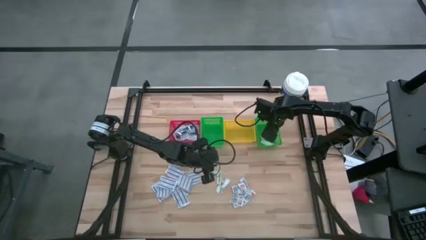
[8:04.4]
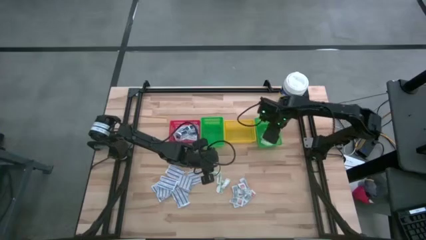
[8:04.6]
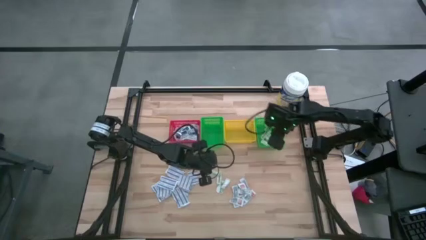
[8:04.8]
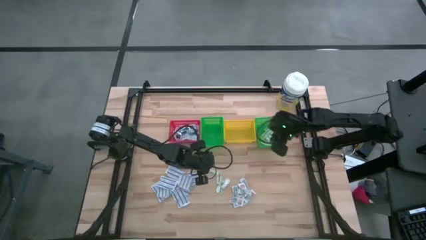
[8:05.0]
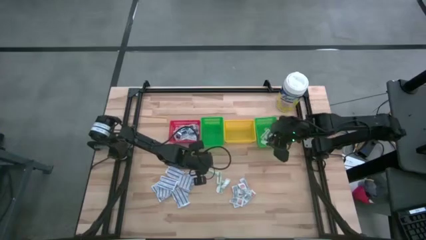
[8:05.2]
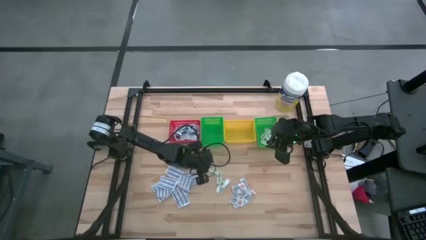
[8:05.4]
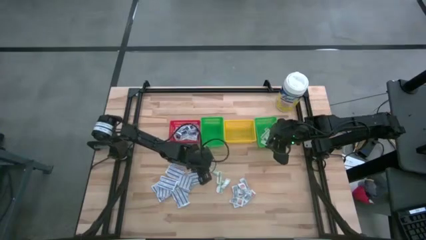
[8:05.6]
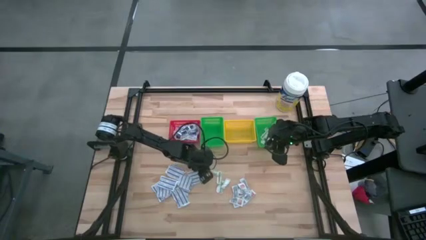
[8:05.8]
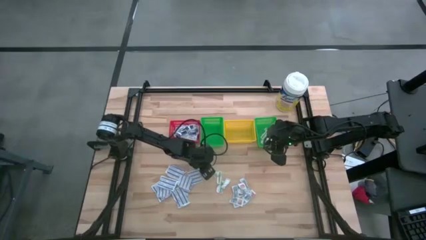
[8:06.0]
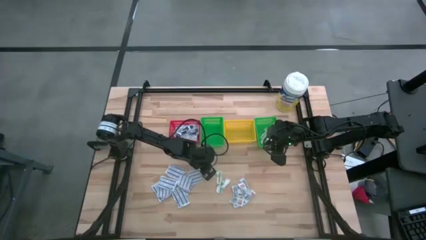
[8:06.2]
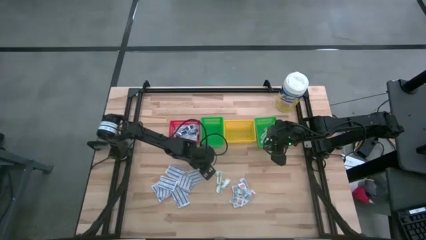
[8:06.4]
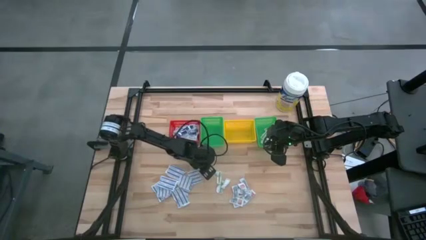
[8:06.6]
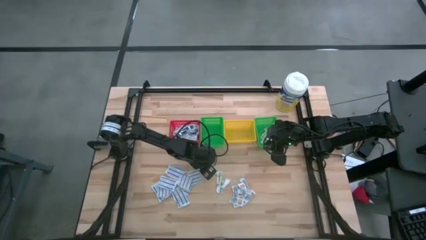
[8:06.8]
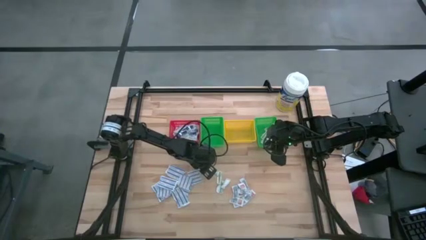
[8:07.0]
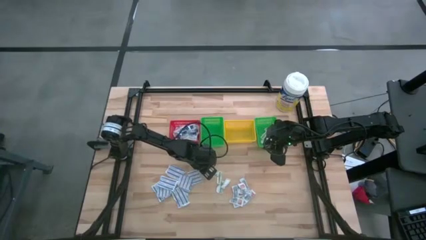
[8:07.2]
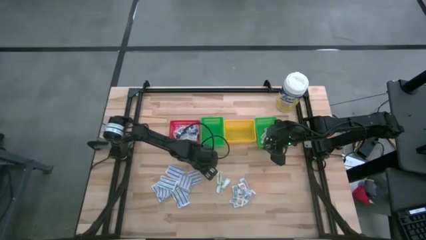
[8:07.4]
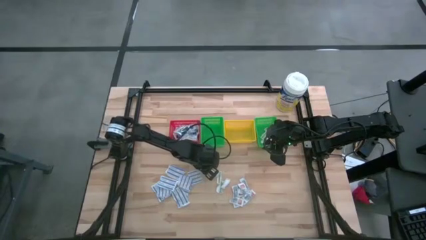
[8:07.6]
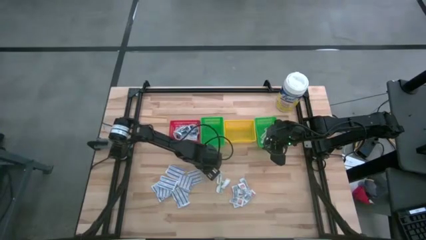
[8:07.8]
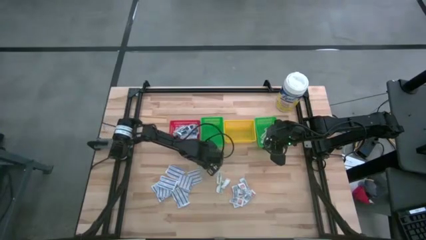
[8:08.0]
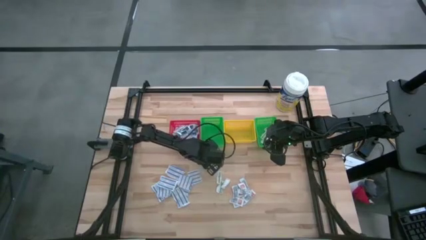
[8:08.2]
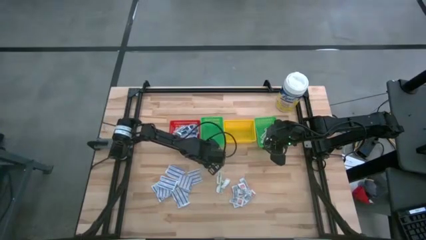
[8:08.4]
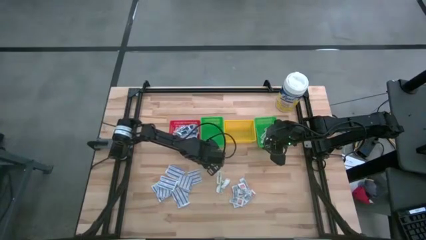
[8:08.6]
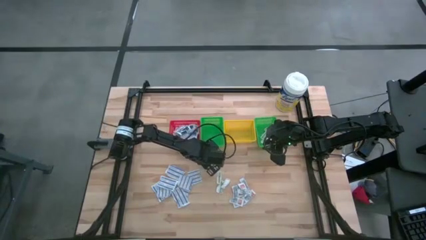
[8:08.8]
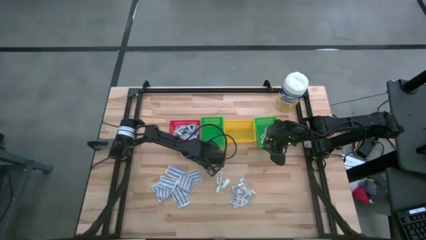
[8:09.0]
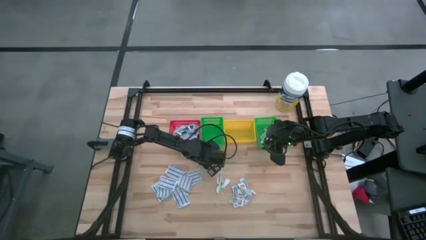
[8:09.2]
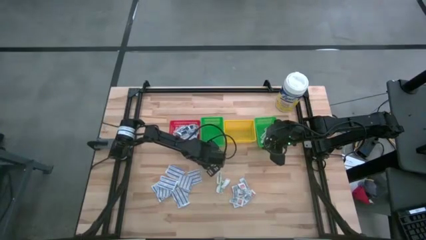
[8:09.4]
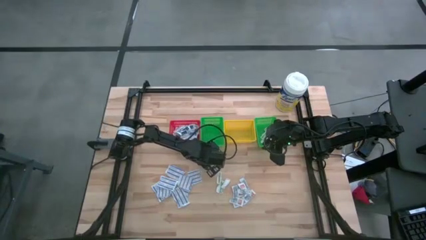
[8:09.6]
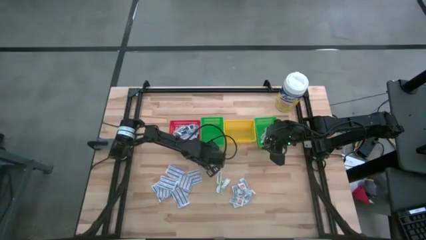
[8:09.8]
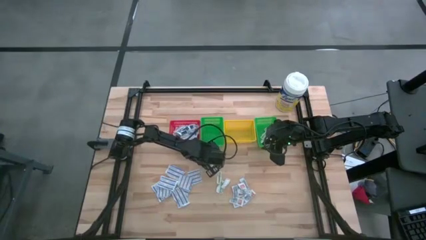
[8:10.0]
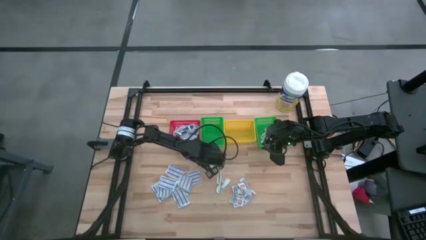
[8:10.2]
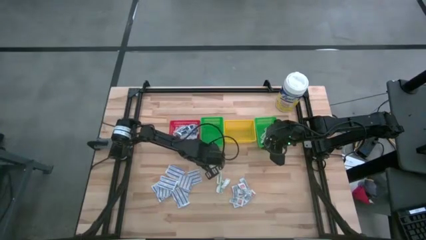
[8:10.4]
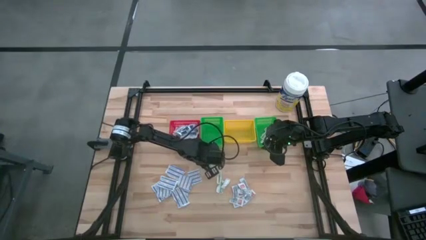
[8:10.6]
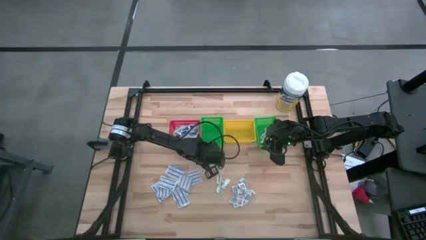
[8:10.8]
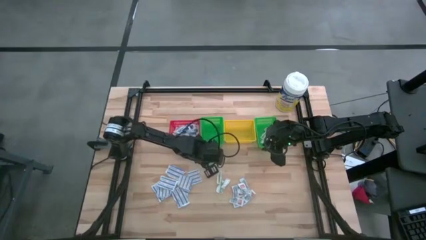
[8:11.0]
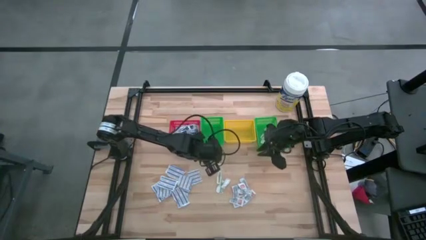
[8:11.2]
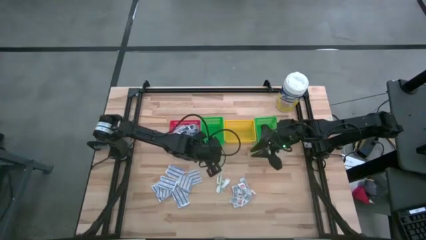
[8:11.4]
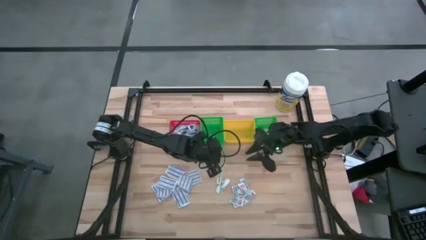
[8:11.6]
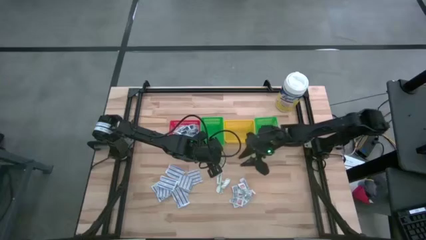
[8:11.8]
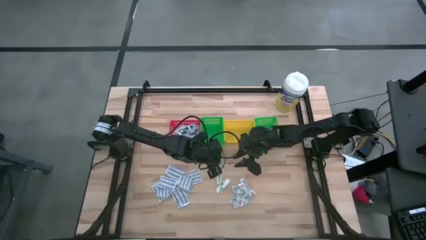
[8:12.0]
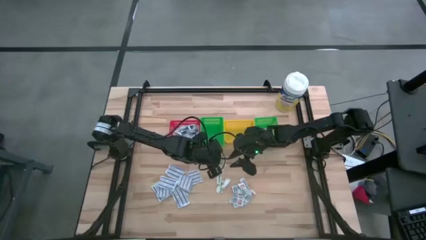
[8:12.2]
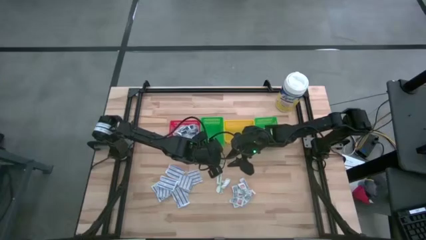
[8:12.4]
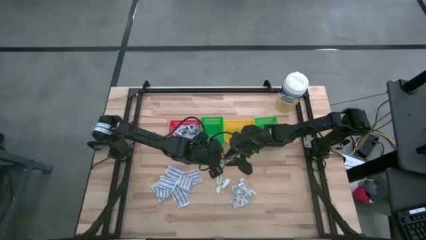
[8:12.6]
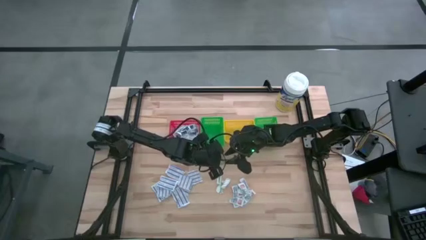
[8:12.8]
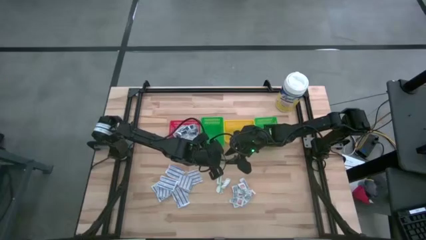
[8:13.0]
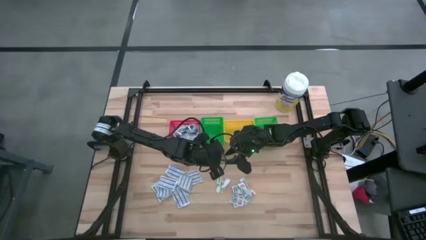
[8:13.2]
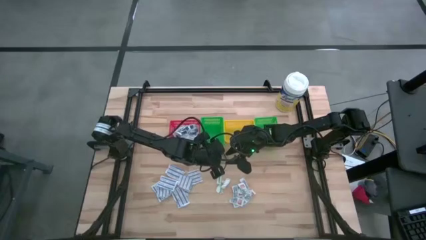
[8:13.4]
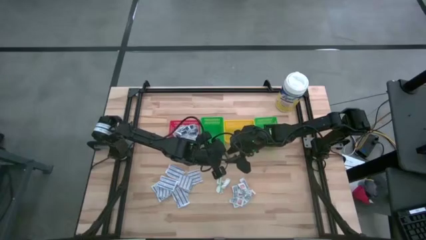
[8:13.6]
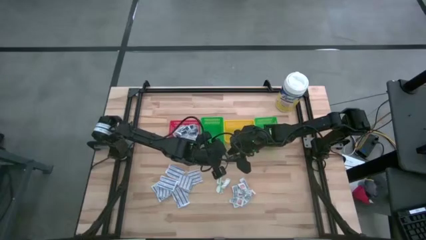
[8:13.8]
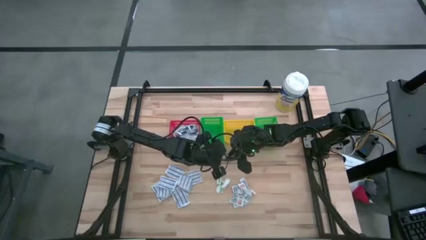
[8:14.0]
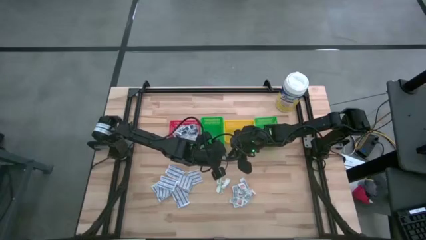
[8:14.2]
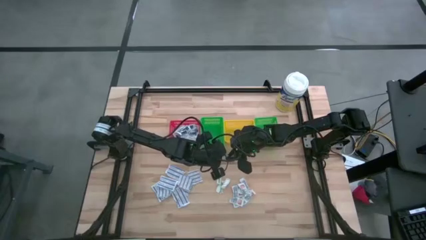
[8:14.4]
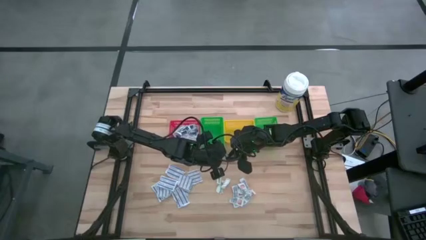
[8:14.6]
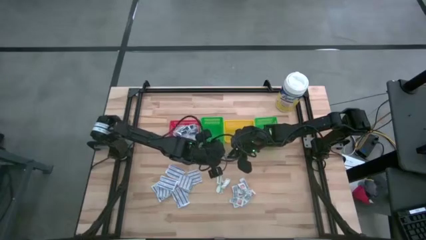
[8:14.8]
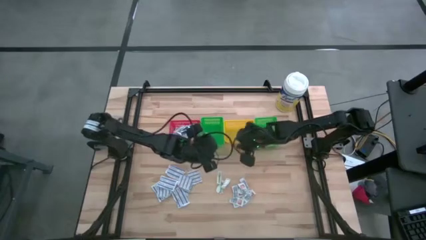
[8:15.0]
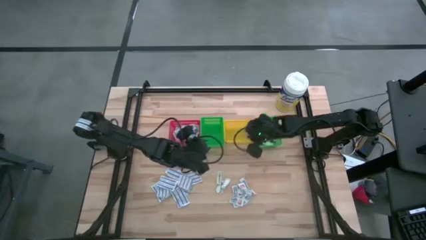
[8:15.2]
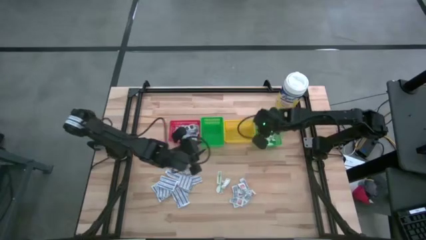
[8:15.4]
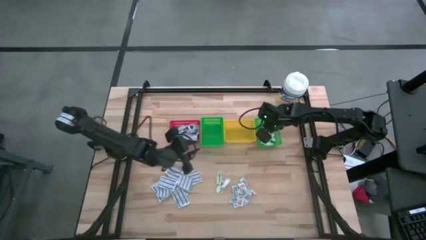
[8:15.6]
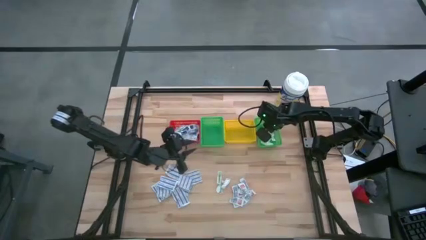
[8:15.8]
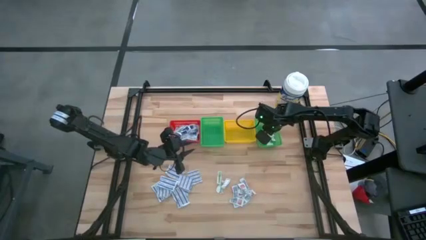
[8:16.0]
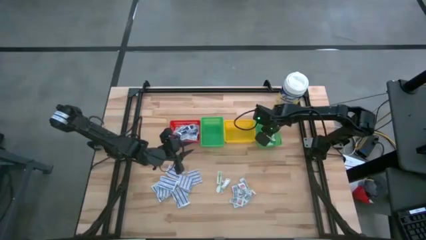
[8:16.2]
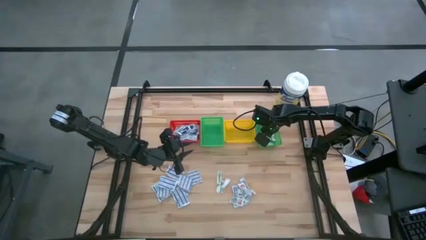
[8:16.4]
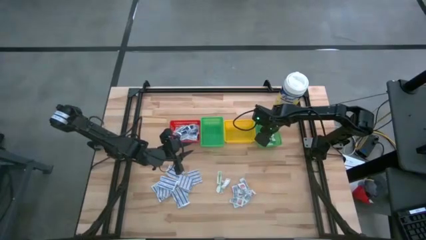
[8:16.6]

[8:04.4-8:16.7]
Task: Pick & Place First Aid Supplies
Put the green bandage into the right green basket

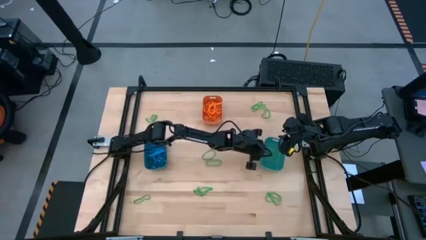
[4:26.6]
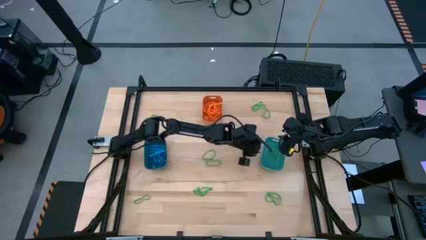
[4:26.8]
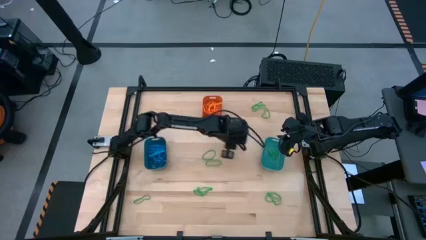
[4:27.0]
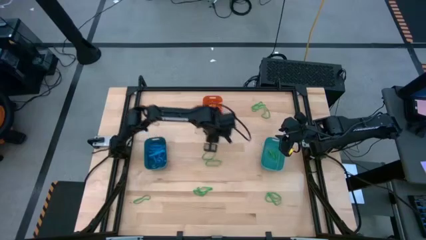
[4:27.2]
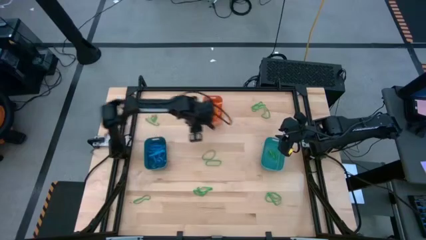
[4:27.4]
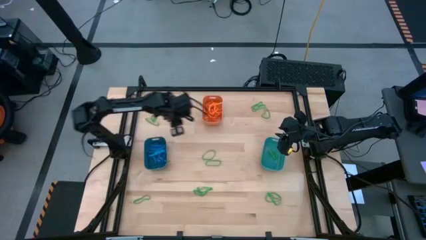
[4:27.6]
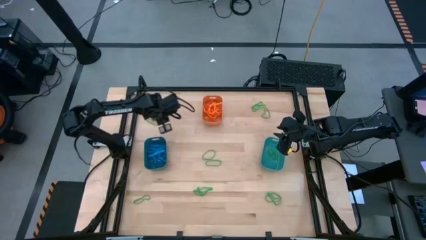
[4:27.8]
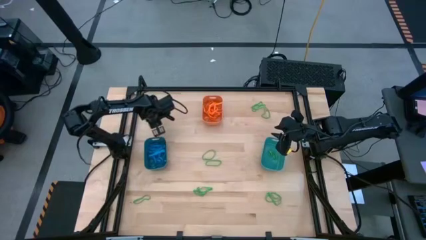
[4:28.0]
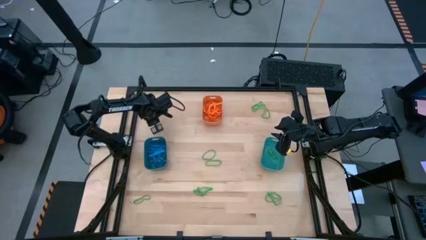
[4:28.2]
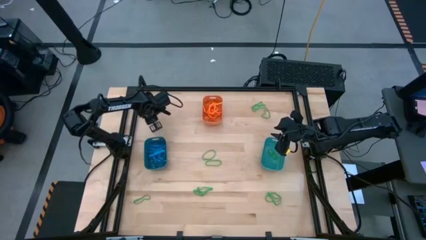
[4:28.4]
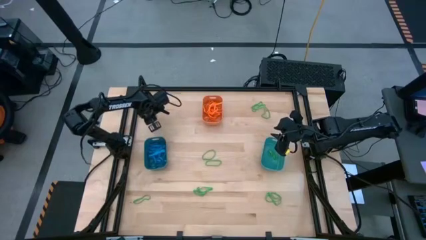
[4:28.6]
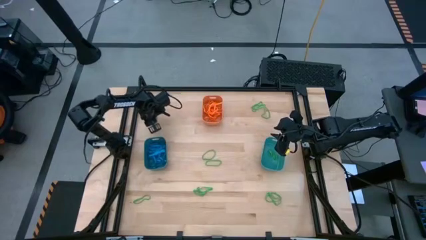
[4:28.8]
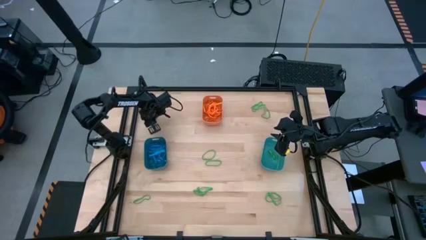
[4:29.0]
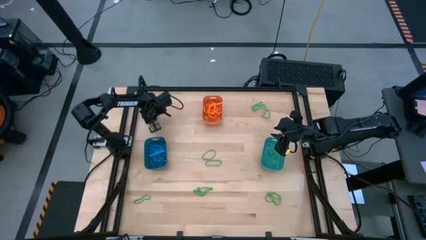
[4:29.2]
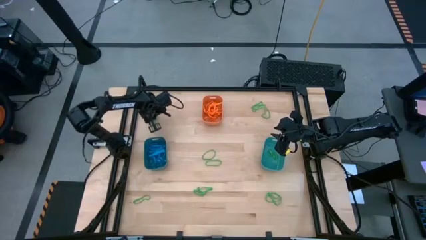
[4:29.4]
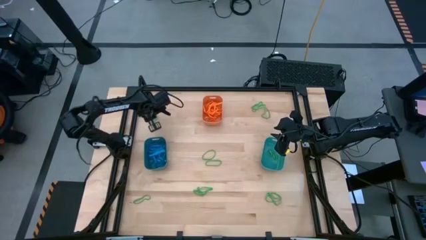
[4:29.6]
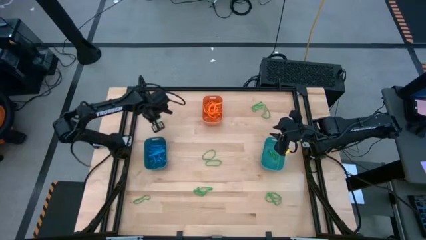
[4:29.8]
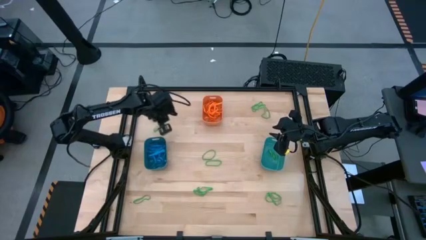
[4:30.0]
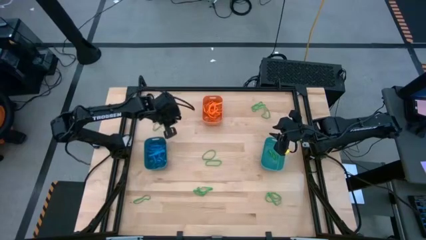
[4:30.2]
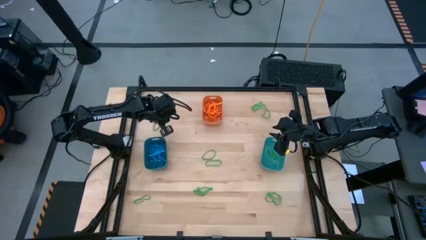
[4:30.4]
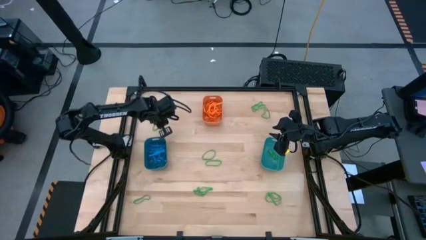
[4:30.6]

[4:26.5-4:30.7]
Task: Sort rubber bands into baskets
Put the green rubber band into the green bin
